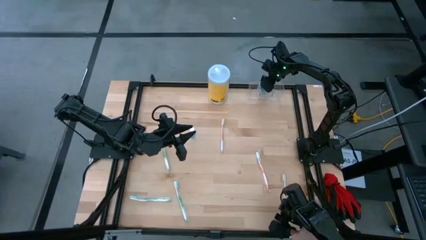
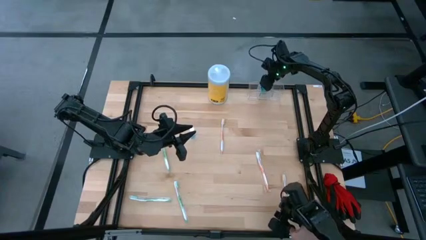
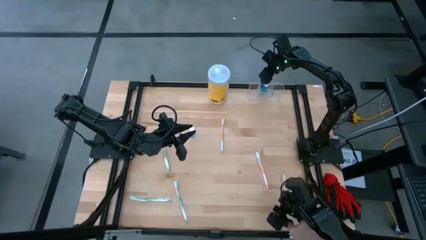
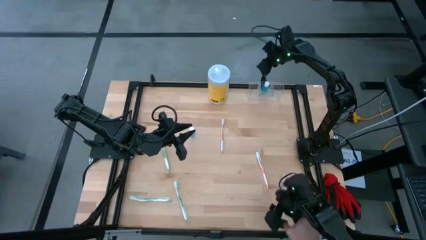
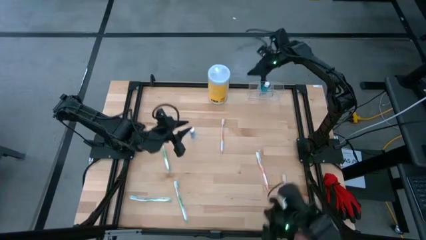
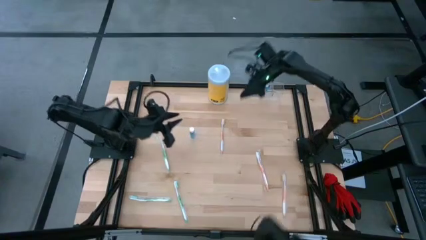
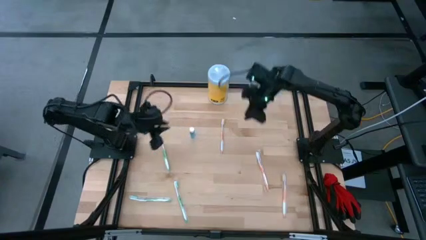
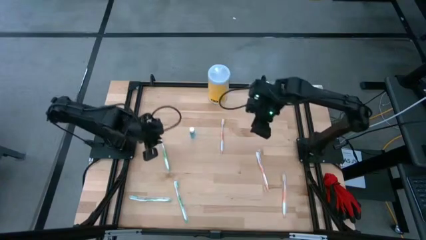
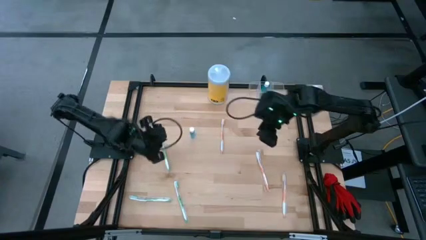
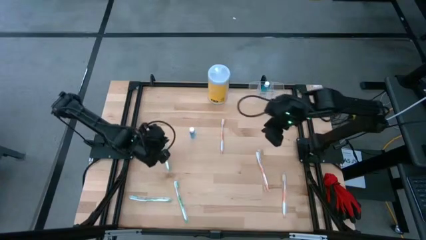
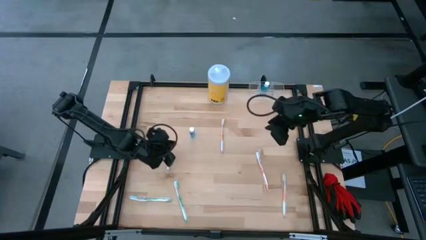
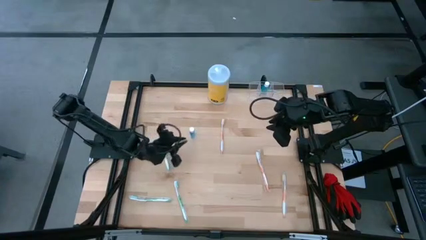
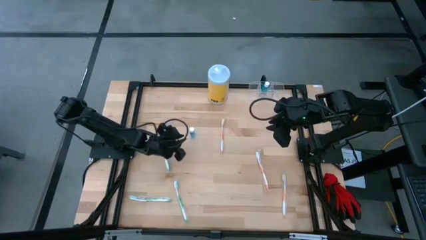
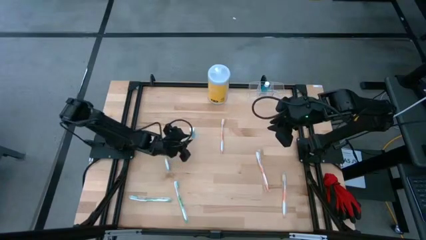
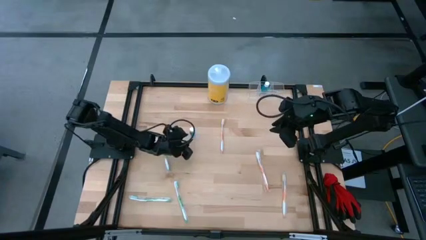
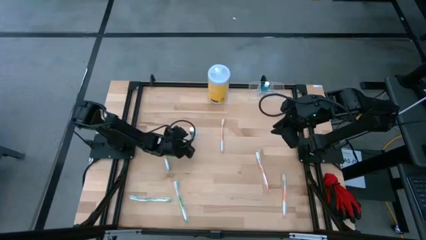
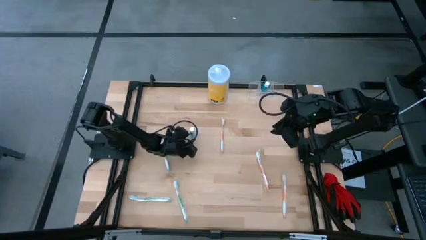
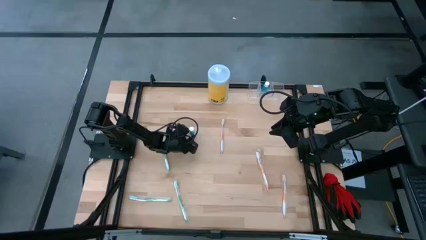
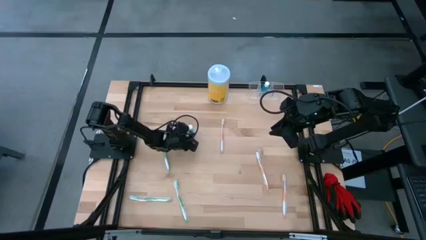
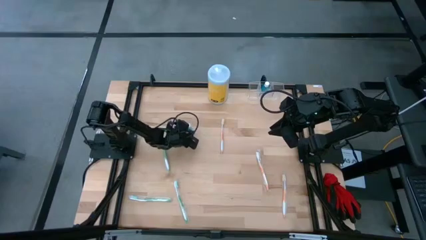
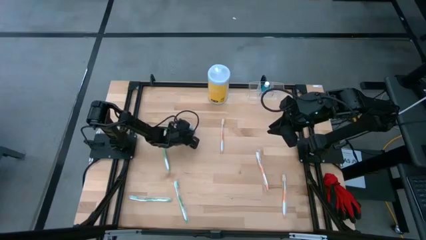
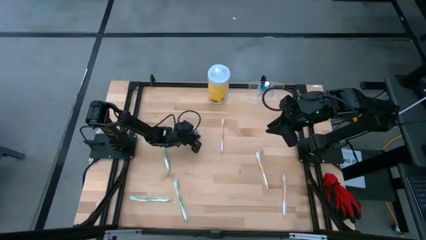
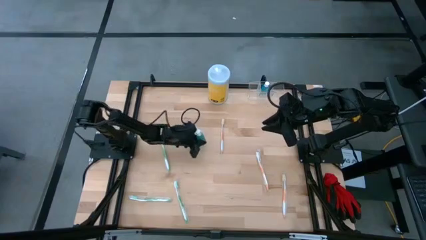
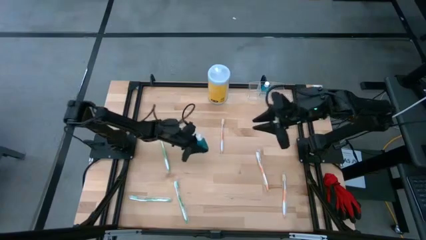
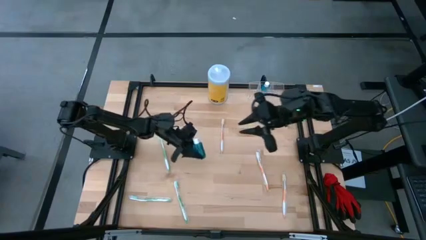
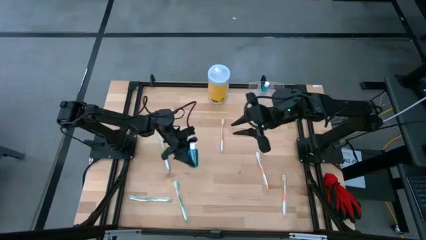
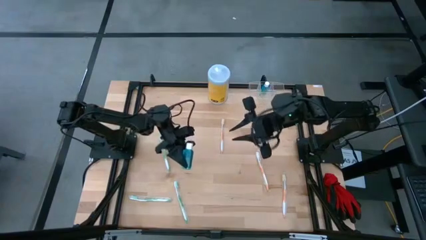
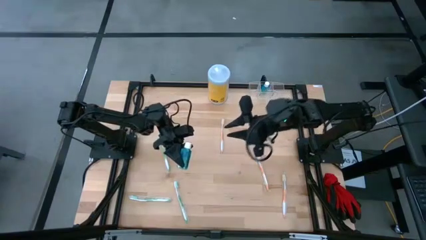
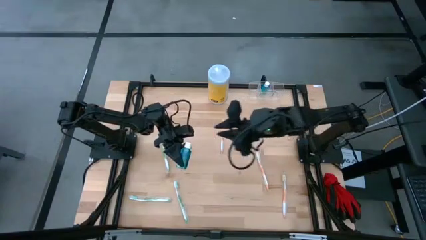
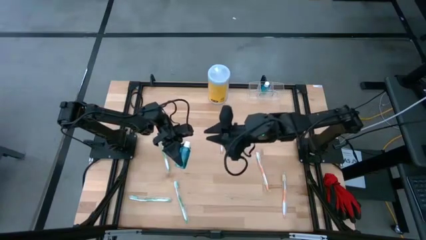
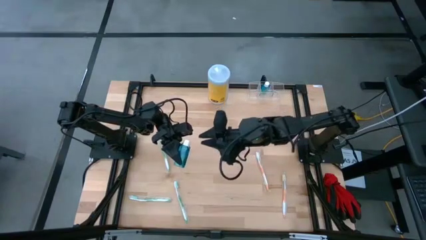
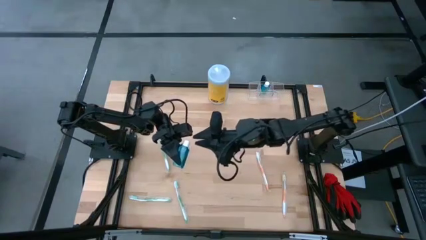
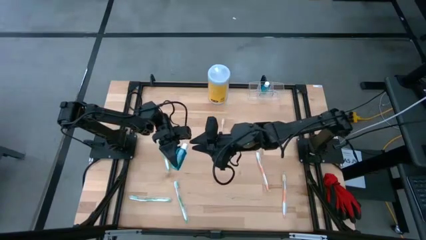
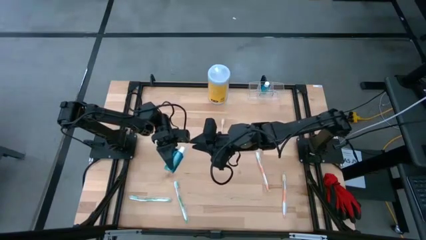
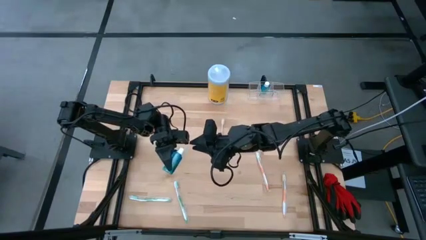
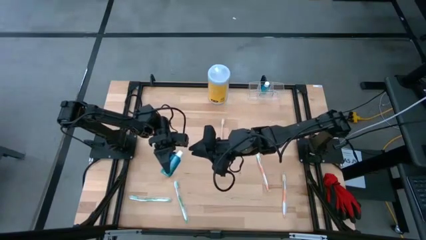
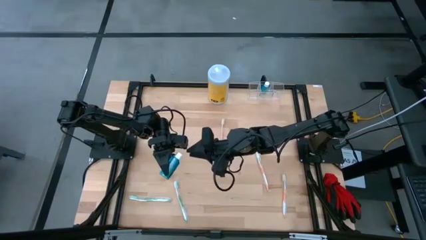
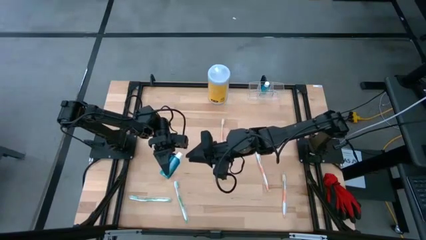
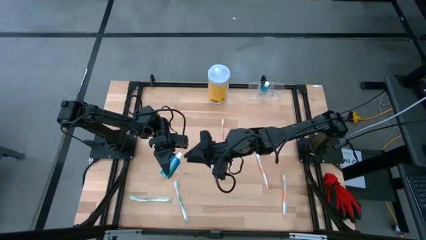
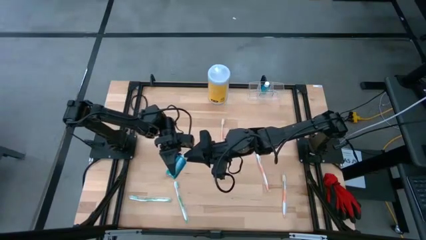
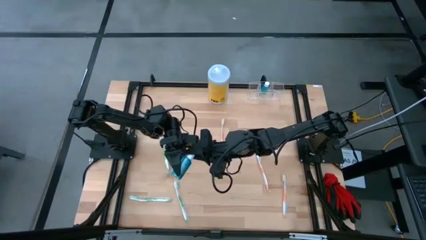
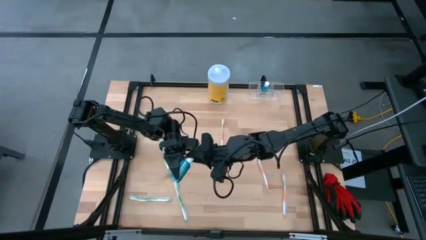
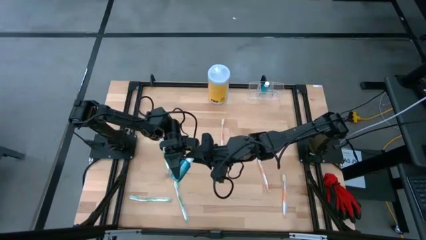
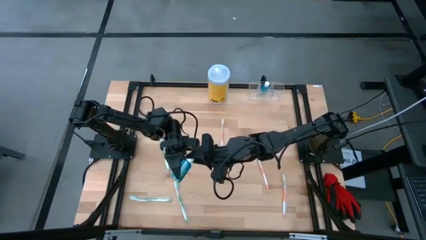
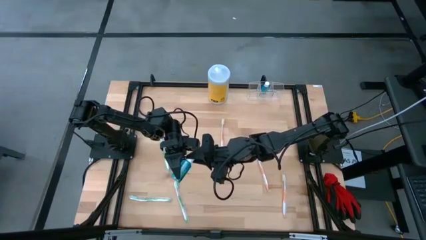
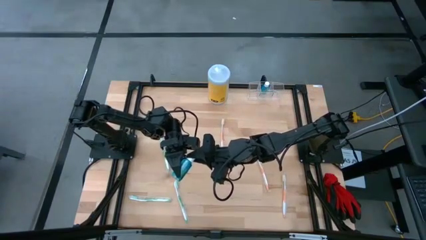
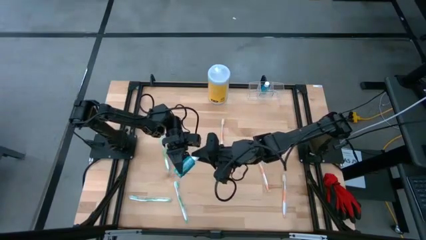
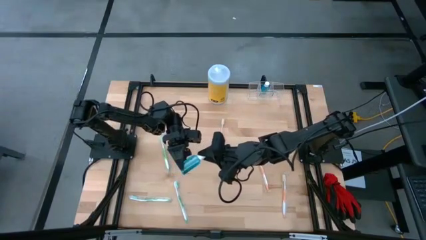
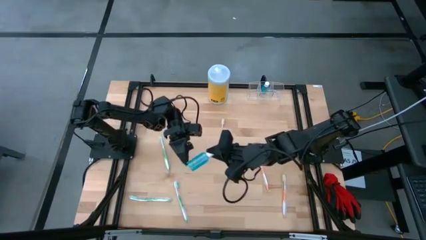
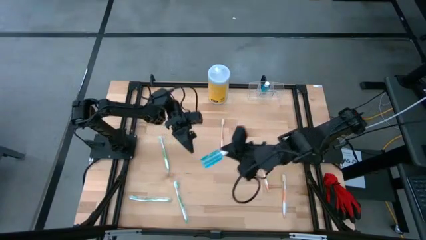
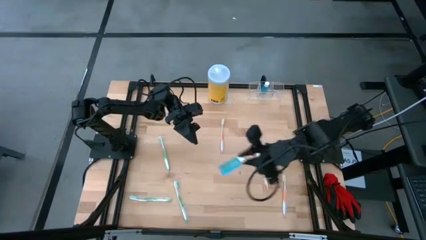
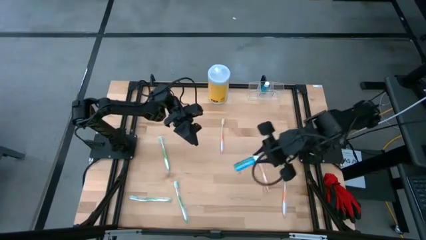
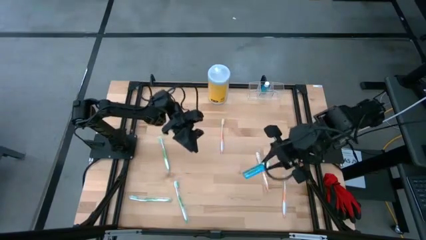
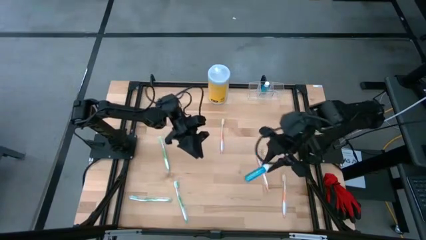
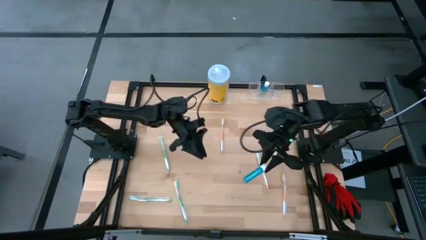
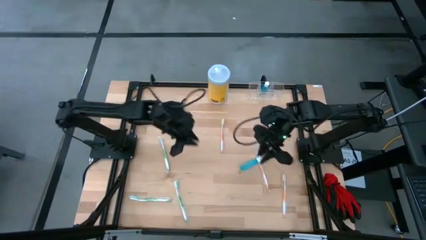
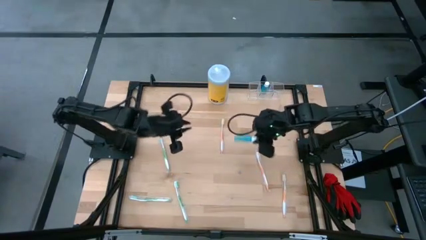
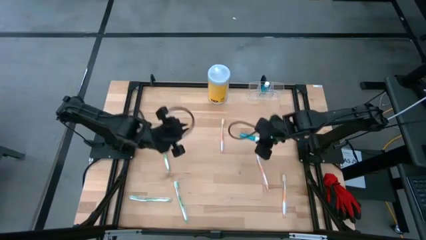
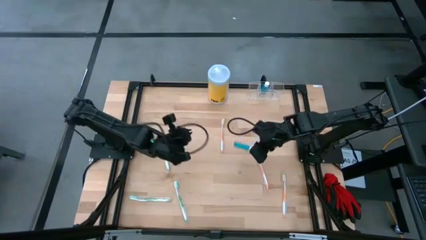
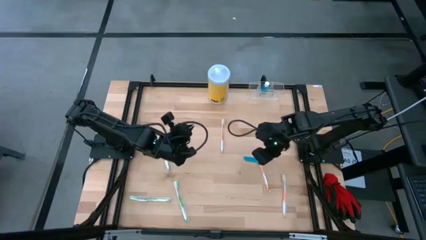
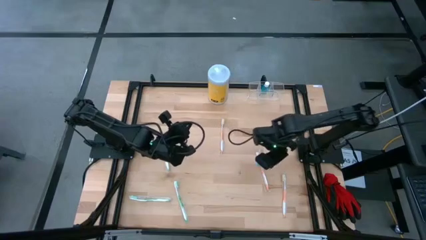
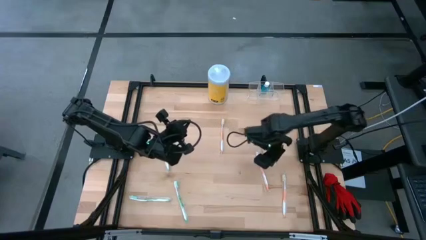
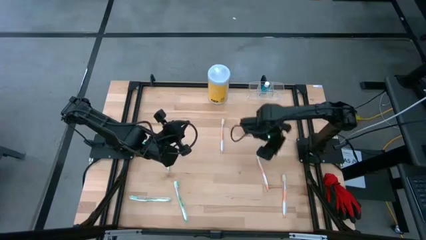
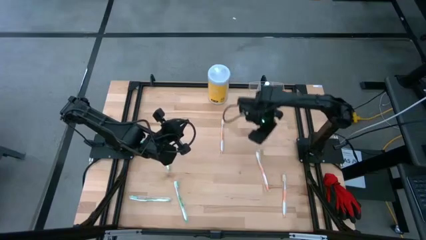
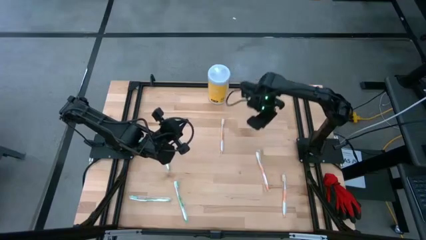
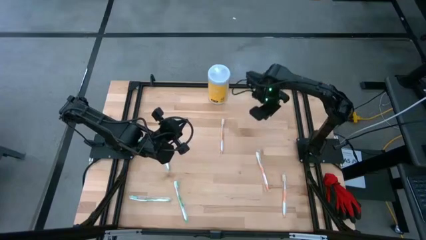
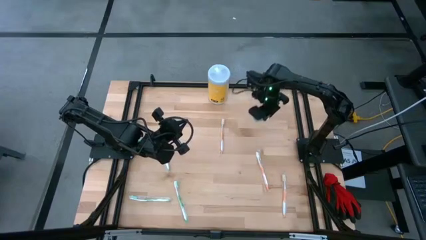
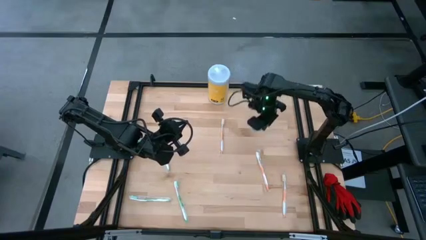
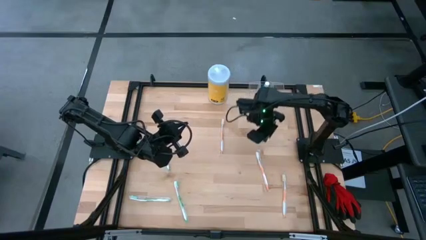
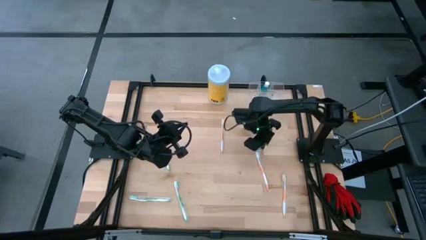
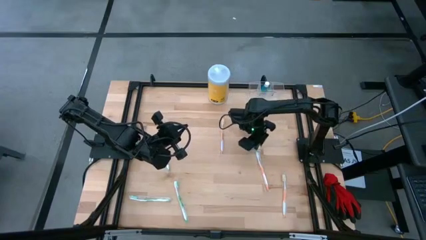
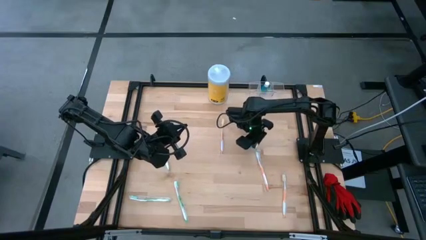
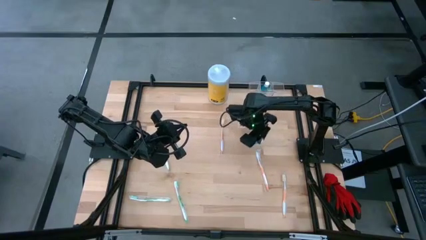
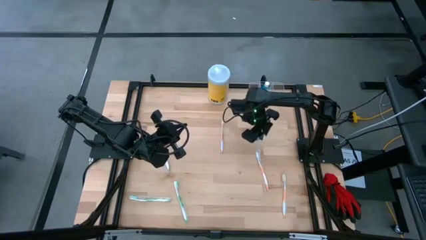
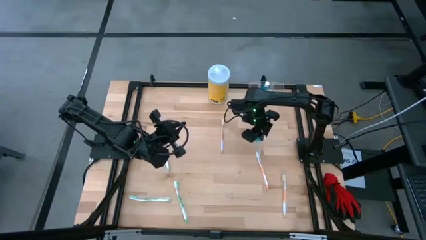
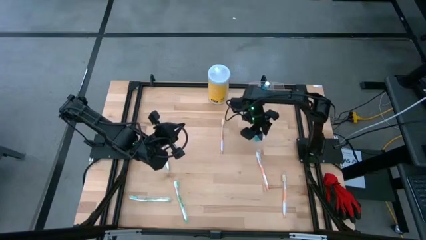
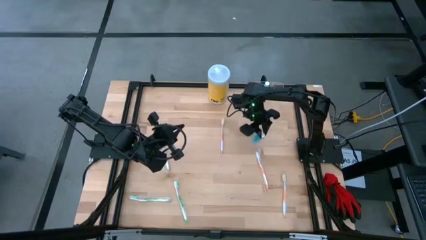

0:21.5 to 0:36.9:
Task: Pick & Place toothbrushing station
Put the blue mouthwash into the transparent organizer
